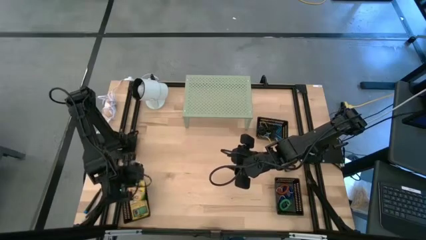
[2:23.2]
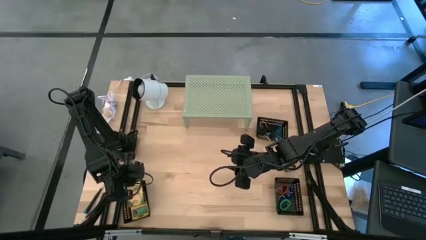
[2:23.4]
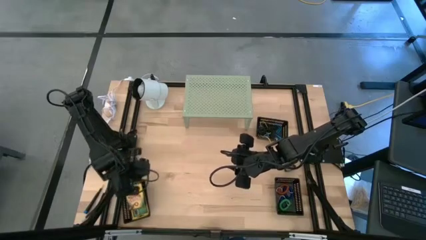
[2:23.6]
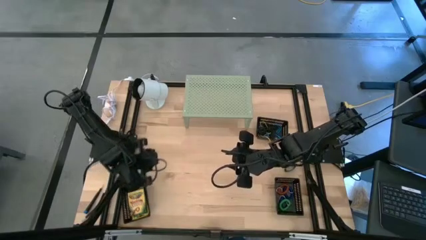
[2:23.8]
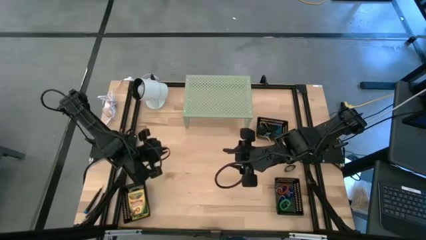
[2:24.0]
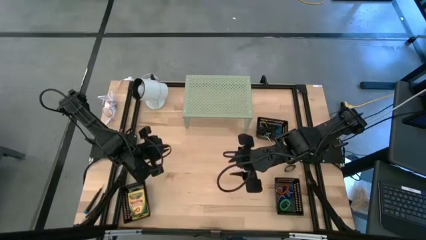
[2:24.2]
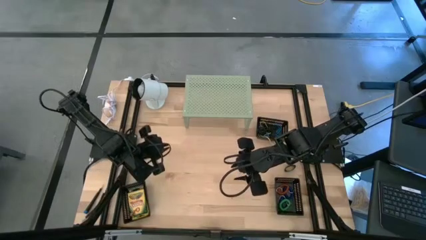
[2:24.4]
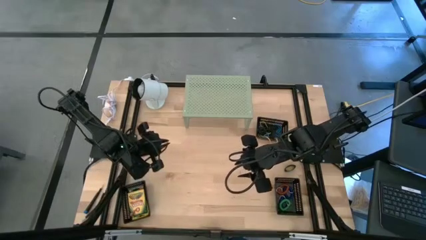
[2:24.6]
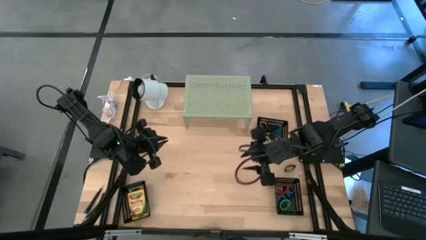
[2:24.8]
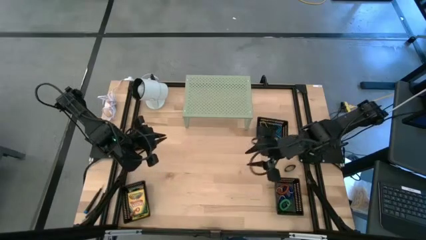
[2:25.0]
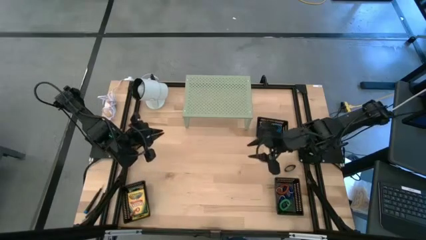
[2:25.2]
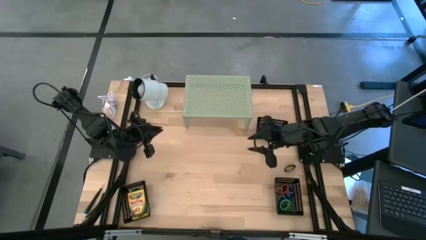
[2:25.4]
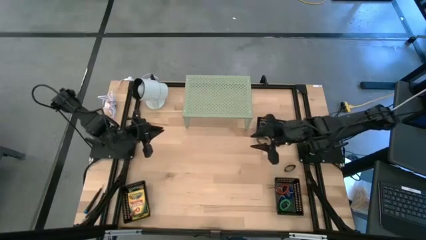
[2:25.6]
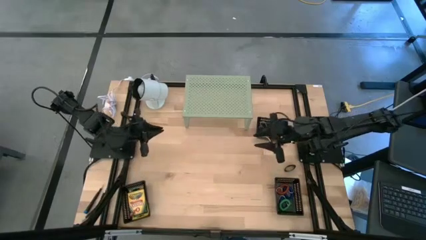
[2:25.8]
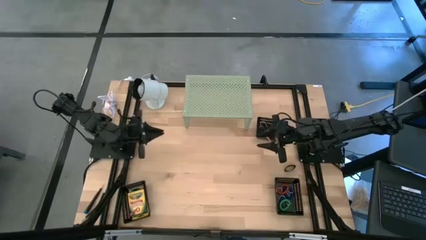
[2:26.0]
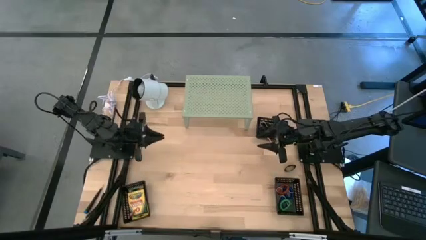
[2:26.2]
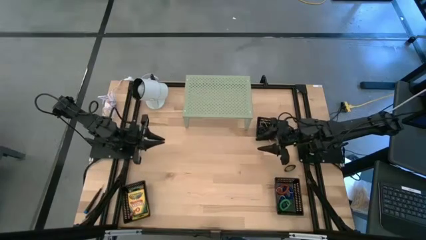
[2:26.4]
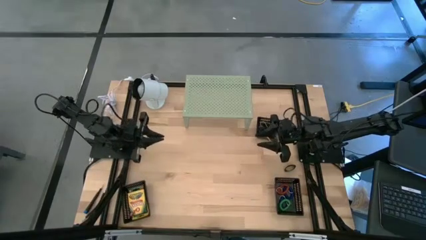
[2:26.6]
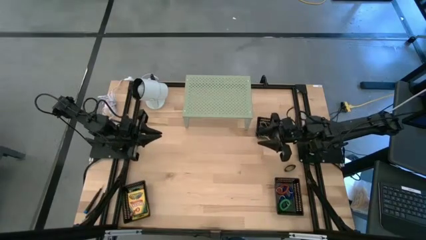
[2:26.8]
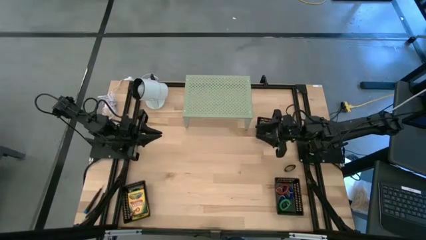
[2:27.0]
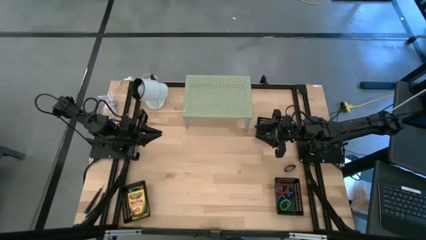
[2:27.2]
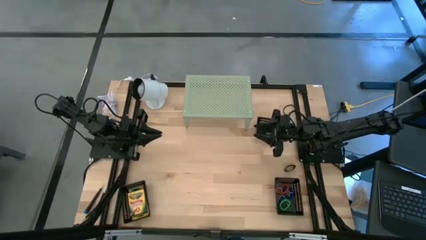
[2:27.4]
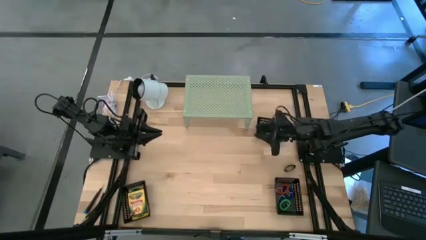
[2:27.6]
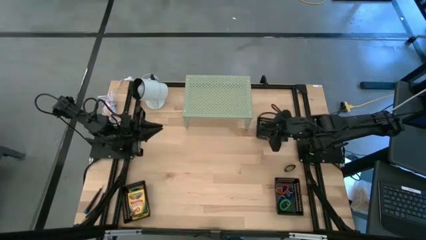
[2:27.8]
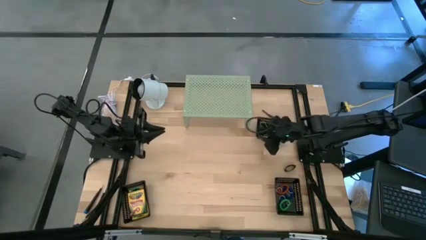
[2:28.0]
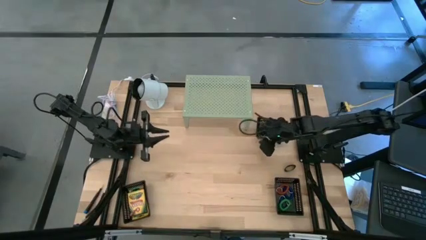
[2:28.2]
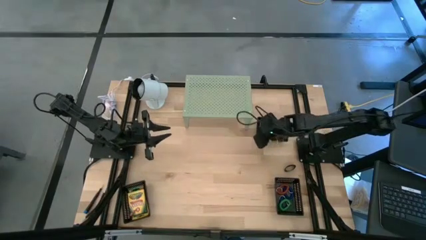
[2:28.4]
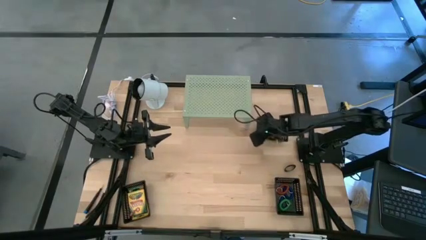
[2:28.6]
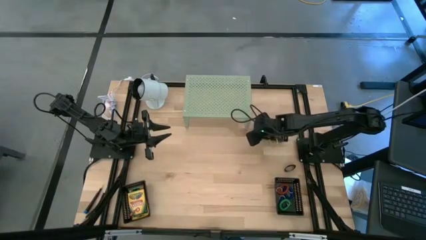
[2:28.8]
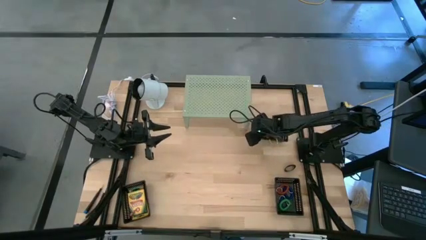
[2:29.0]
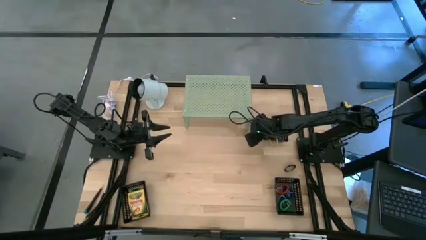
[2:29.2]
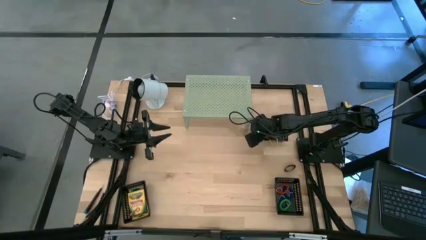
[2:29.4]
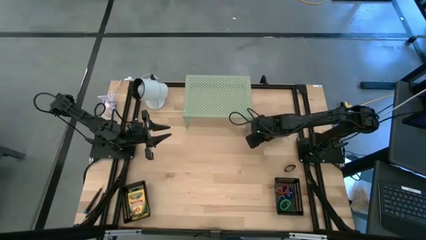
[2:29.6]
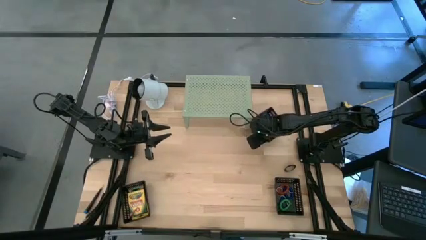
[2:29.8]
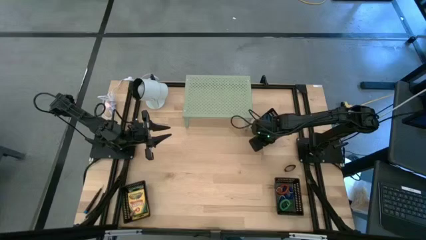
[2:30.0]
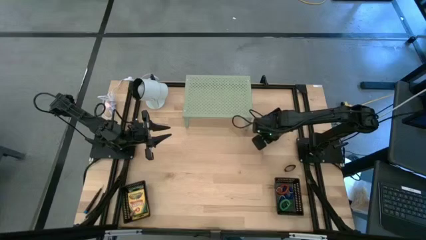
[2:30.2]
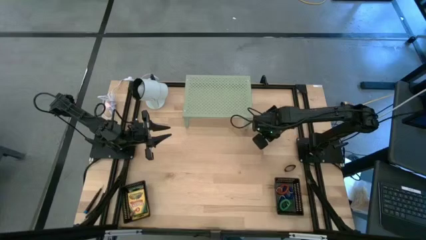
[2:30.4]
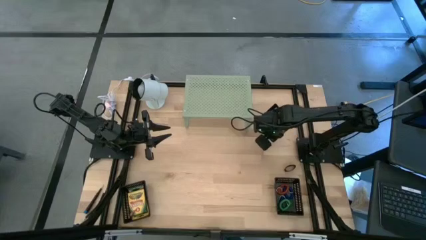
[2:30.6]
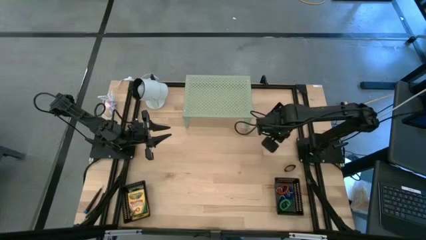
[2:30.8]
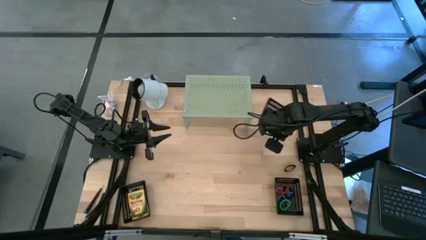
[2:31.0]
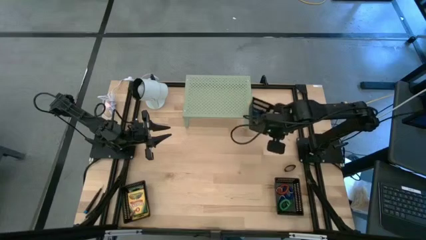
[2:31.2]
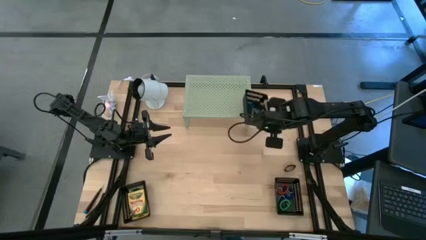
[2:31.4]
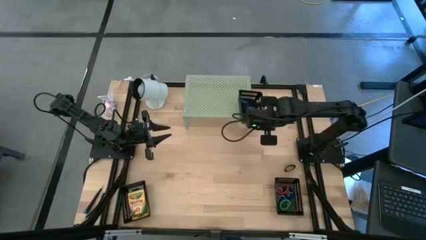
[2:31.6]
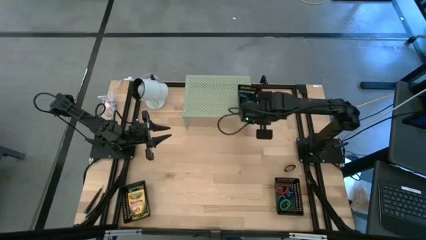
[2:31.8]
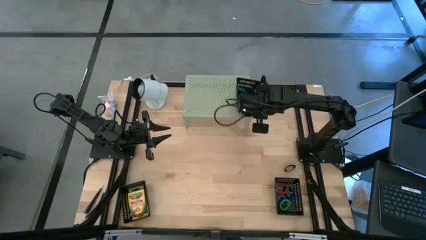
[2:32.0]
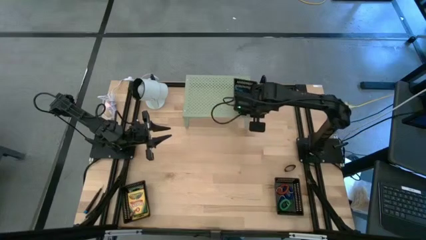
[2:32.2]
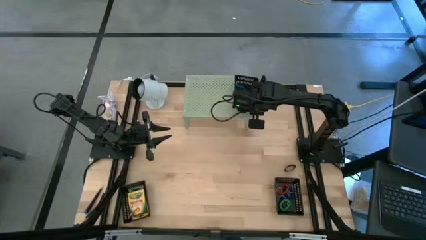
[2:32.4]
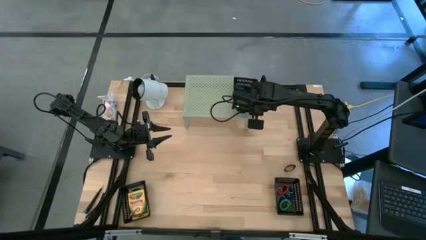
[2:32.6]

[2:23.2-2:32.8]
Task: Pick & Place Office Desk Supplies
Put the top right black bin on the shelf

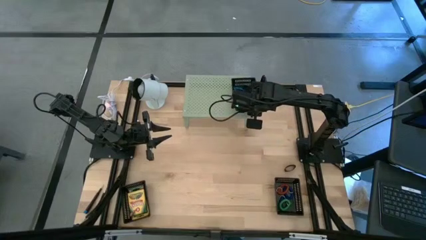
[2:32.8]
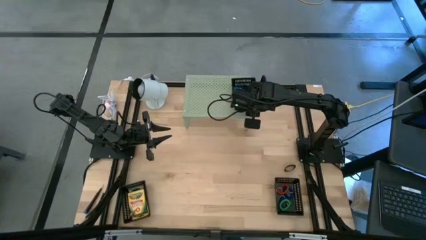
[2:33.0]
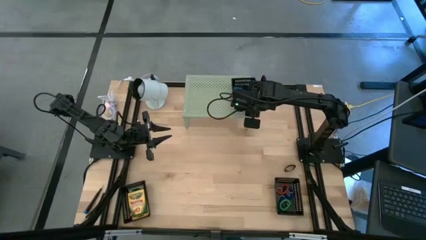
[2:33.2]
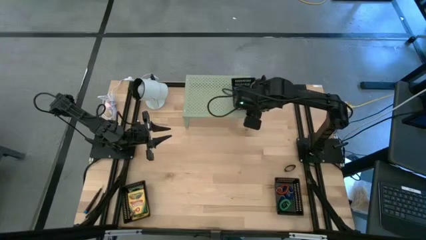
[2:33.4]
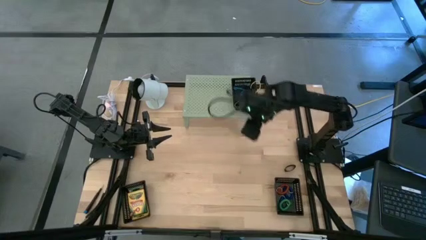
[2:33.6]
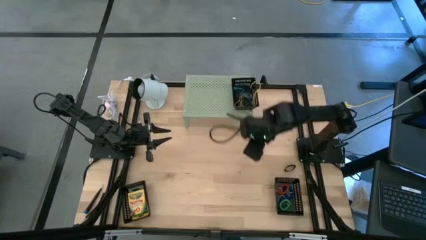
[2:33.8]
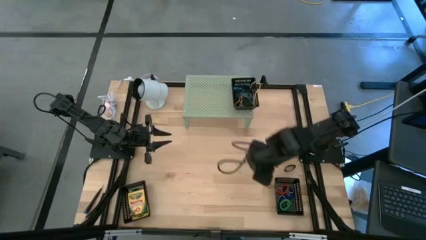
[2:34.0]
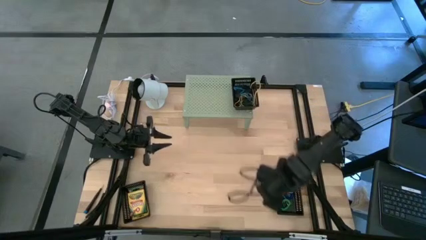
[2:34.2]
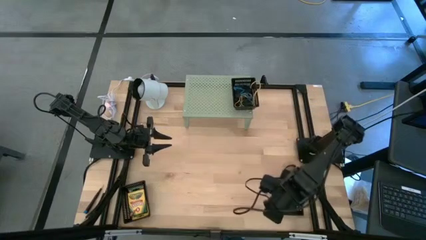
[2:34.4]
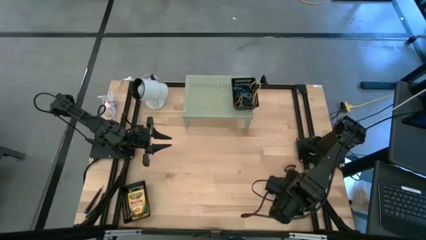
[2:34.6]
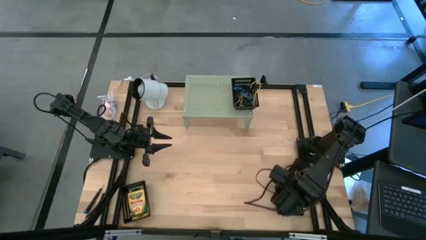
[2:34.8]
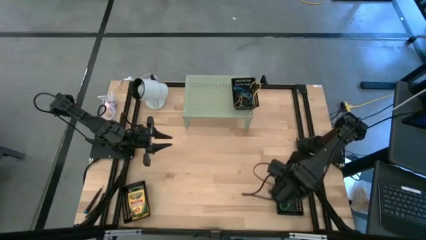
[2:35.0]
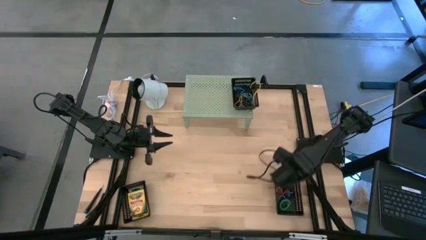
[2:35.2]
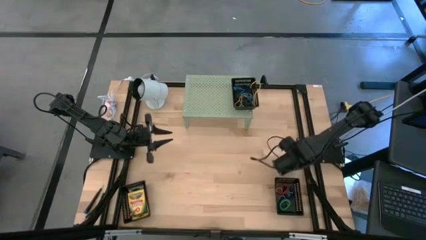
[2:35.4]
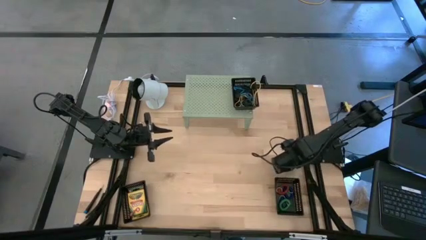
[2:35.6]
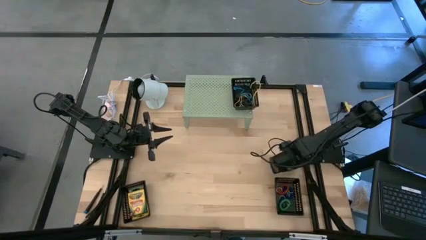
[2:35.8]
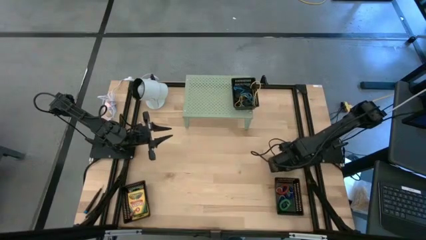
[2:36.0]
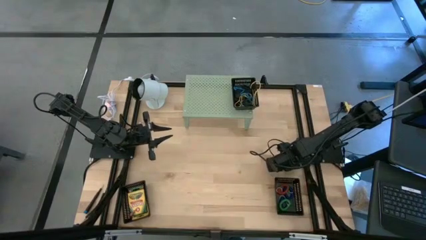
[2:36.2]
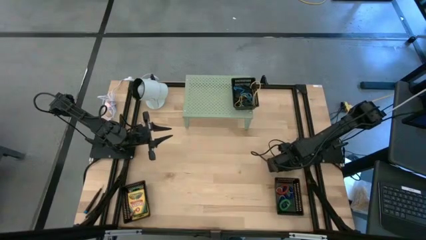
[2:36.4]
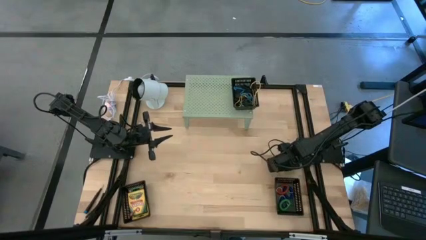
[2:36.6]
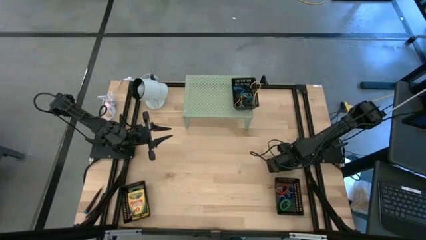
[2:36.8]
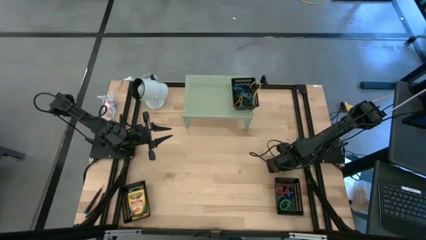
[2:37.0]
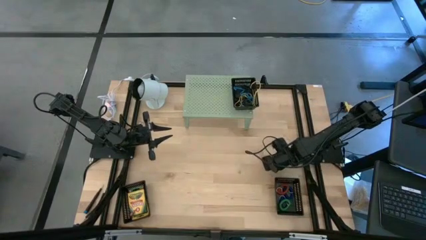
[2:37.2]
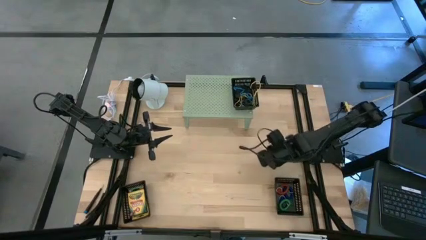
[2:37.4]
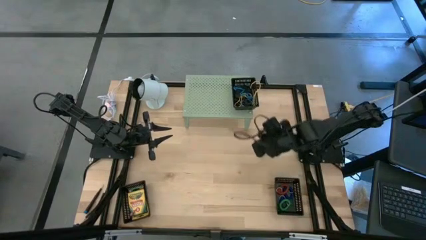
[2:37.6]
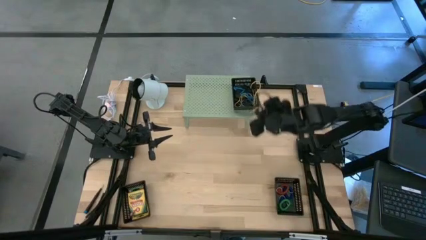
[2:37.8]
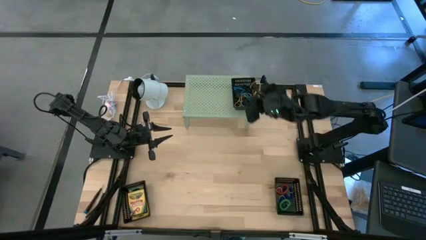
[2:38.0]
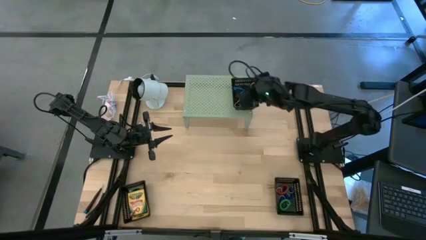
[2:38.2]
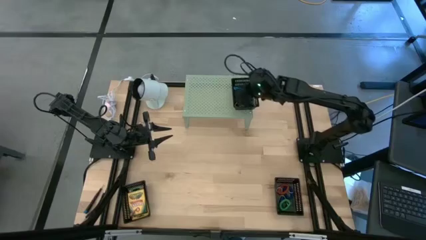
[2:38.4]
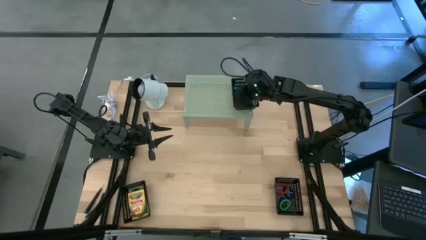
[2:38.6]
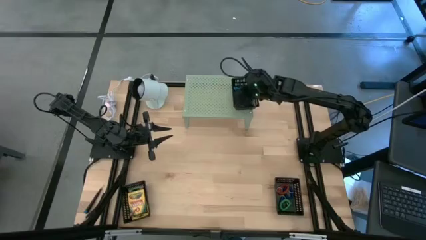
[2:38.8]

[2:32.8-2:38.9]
Put the black rubber band into the black bin on the shelf
